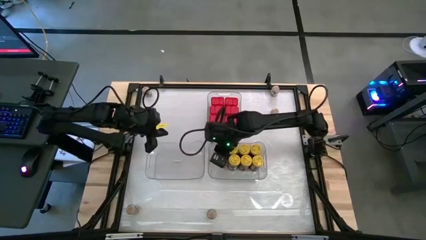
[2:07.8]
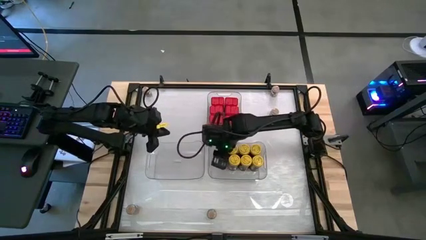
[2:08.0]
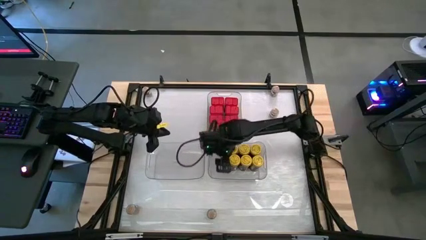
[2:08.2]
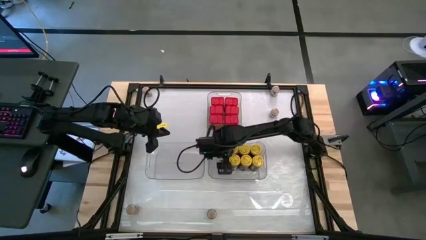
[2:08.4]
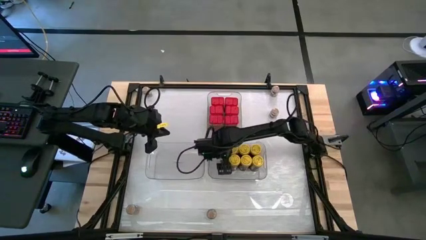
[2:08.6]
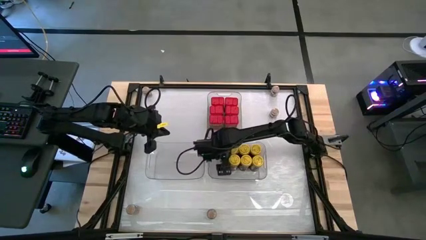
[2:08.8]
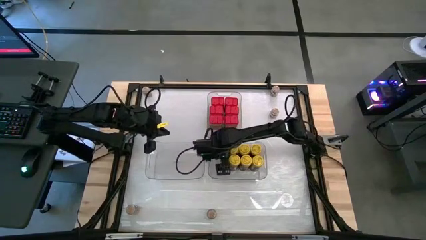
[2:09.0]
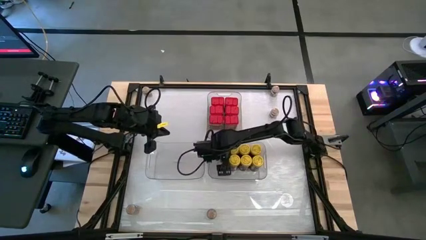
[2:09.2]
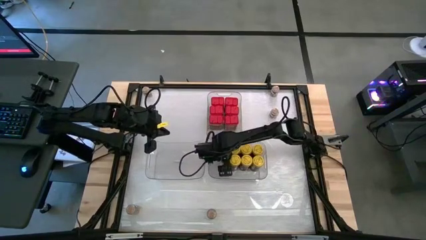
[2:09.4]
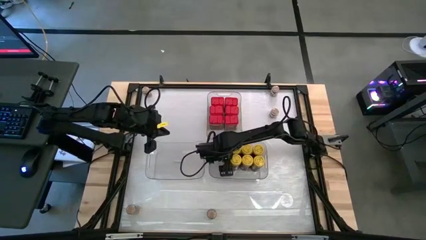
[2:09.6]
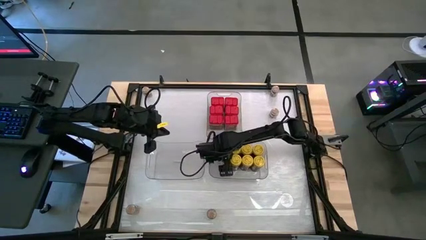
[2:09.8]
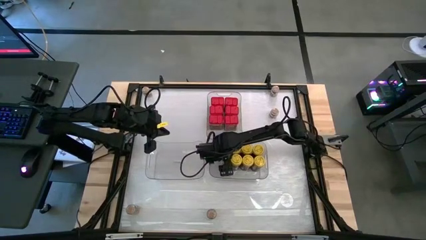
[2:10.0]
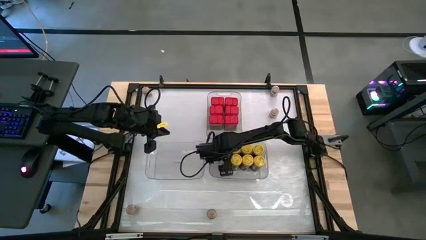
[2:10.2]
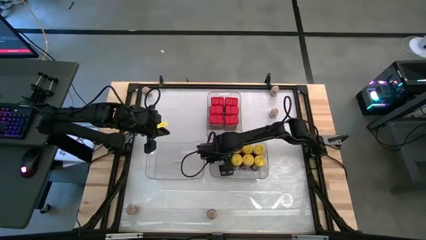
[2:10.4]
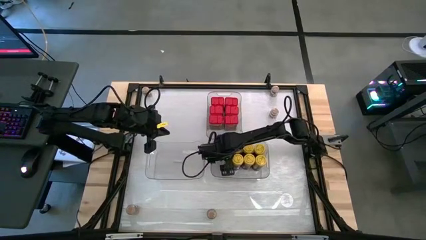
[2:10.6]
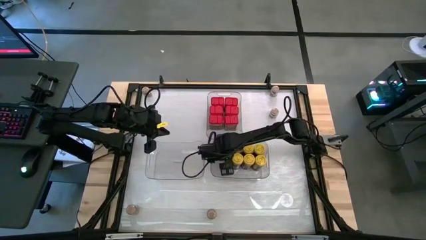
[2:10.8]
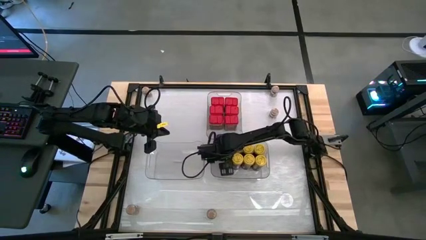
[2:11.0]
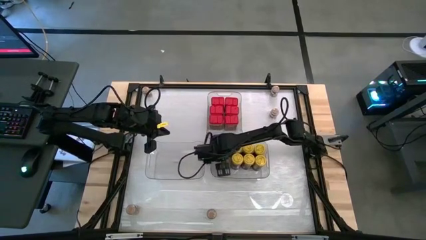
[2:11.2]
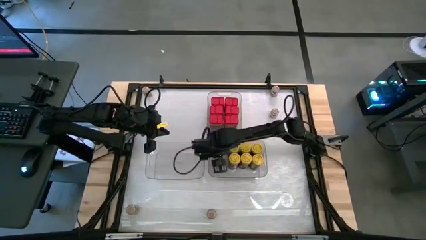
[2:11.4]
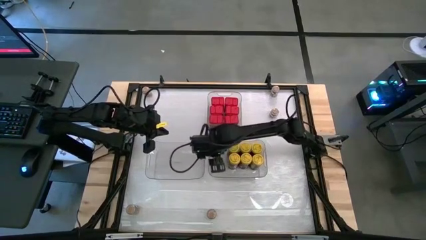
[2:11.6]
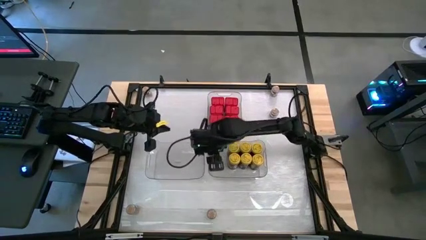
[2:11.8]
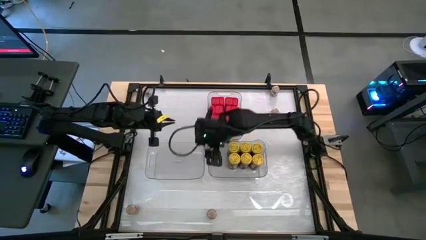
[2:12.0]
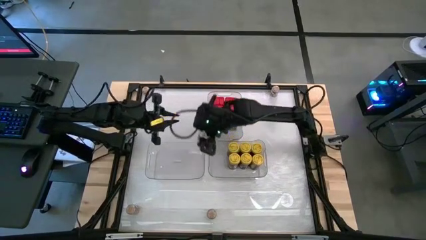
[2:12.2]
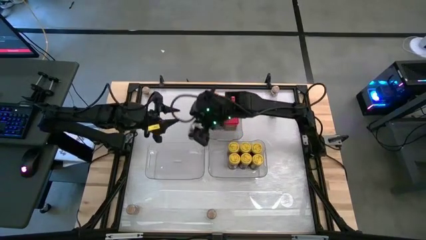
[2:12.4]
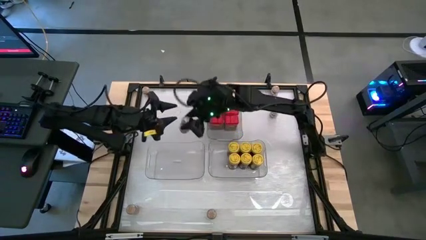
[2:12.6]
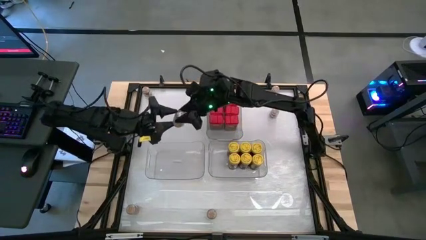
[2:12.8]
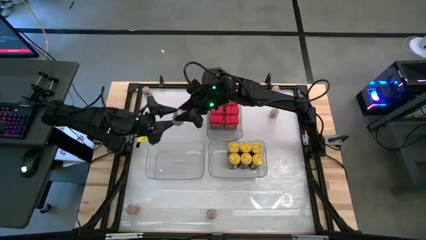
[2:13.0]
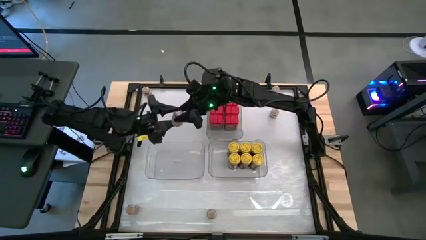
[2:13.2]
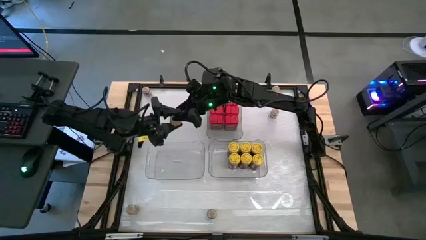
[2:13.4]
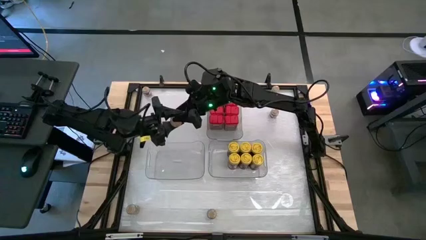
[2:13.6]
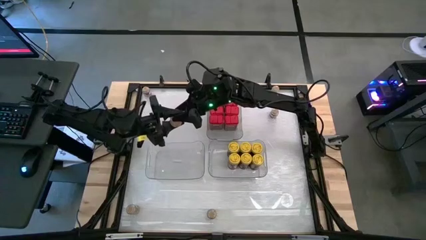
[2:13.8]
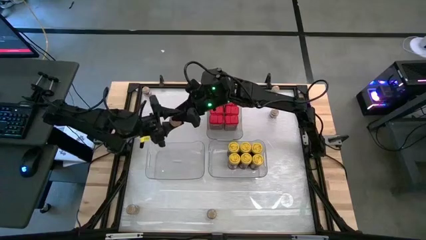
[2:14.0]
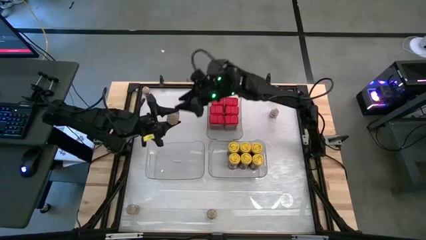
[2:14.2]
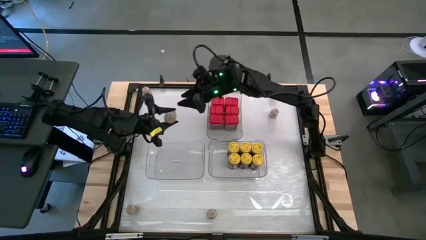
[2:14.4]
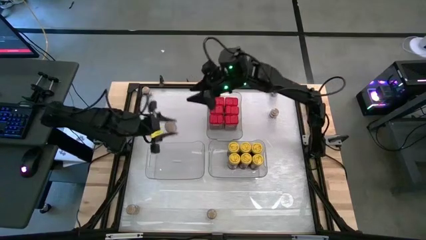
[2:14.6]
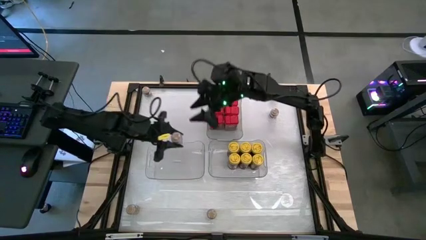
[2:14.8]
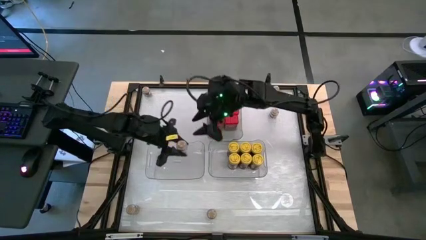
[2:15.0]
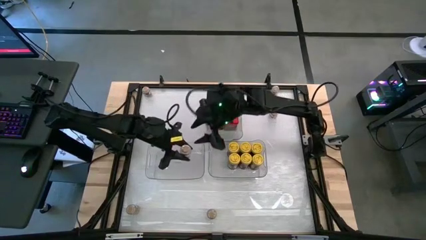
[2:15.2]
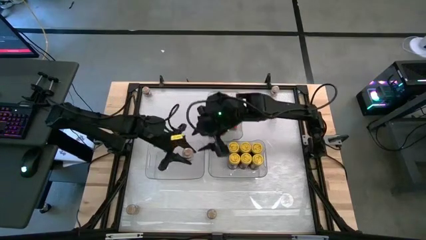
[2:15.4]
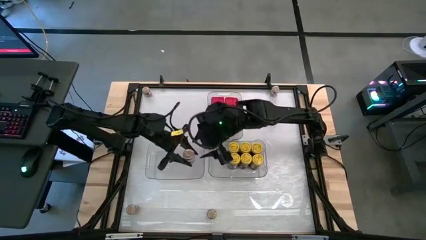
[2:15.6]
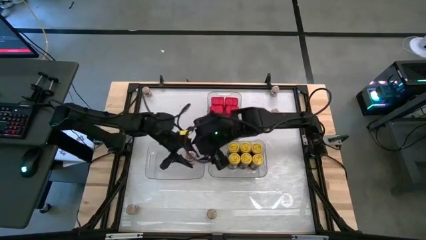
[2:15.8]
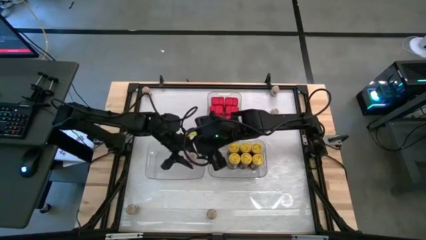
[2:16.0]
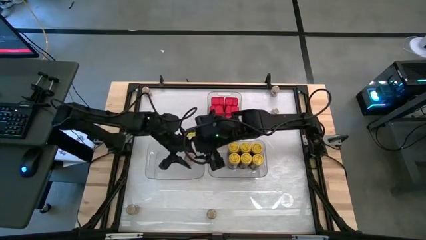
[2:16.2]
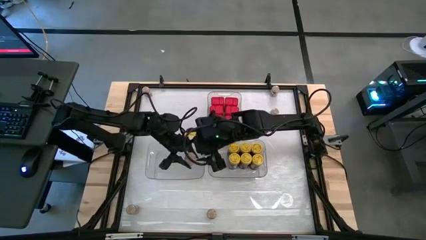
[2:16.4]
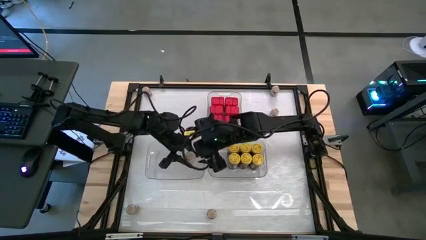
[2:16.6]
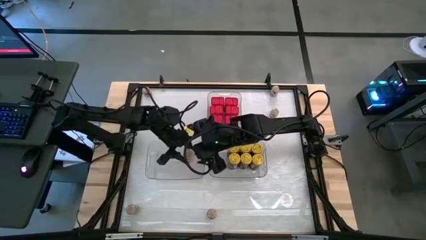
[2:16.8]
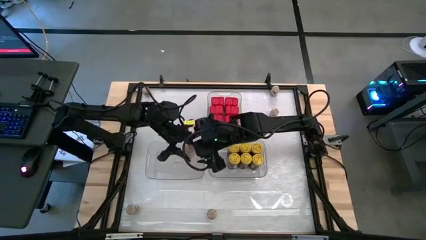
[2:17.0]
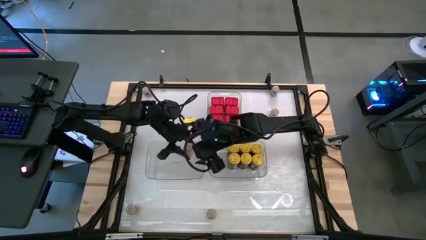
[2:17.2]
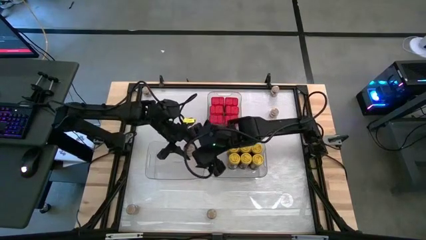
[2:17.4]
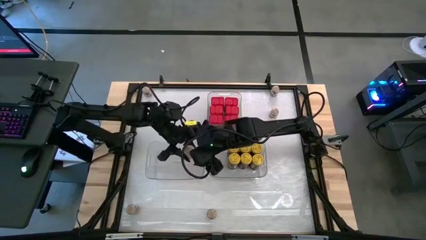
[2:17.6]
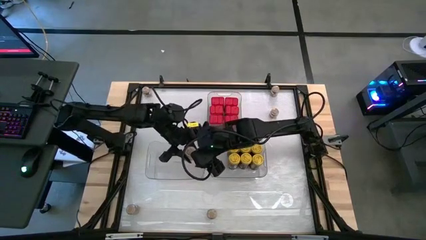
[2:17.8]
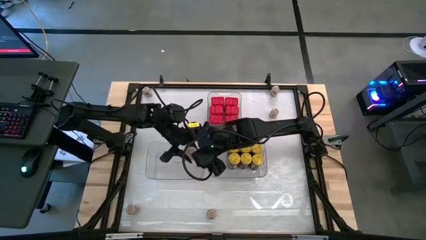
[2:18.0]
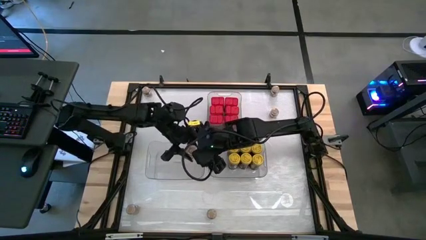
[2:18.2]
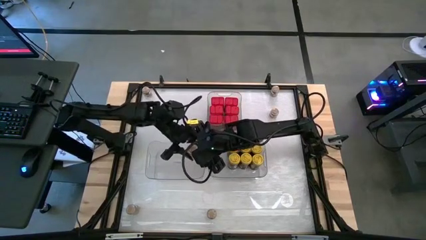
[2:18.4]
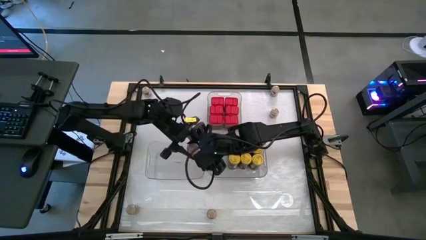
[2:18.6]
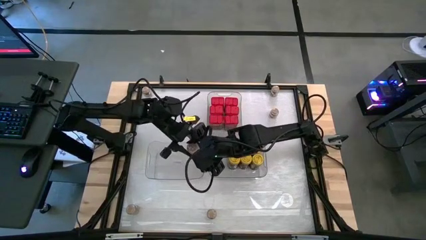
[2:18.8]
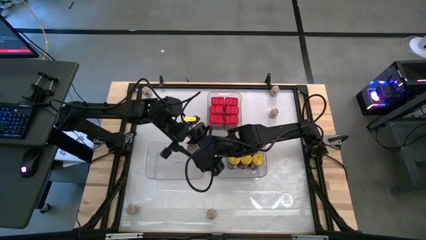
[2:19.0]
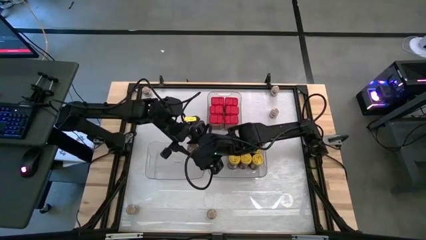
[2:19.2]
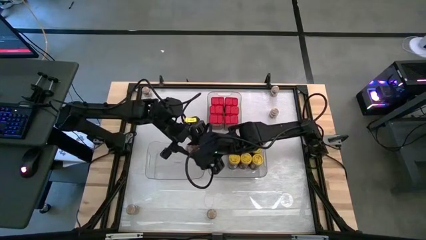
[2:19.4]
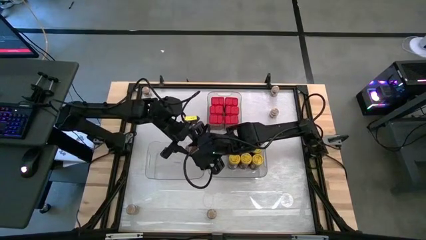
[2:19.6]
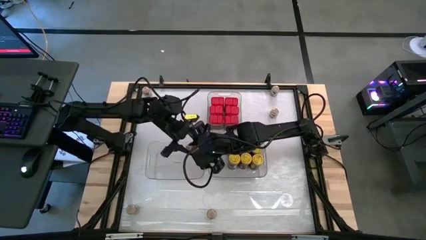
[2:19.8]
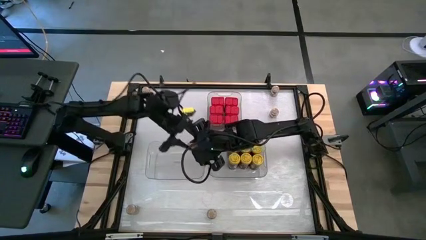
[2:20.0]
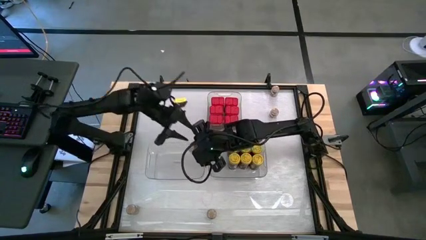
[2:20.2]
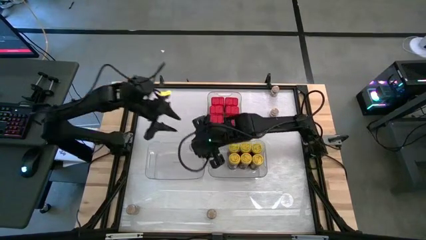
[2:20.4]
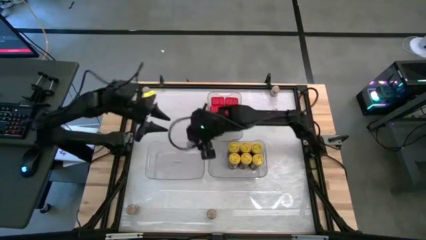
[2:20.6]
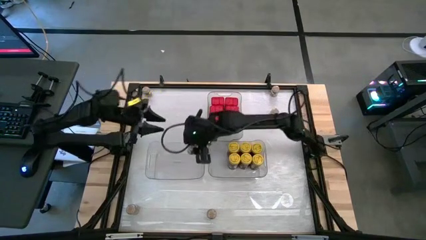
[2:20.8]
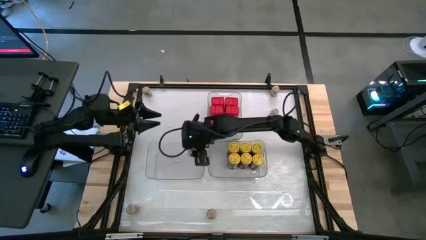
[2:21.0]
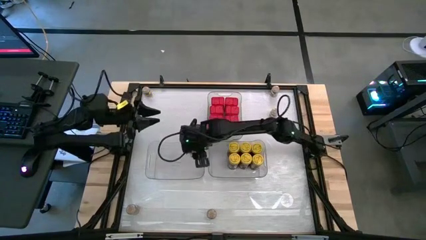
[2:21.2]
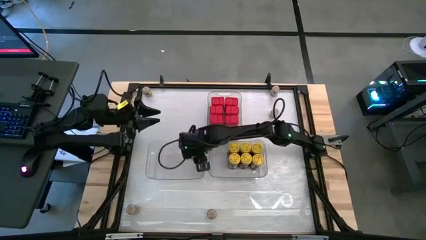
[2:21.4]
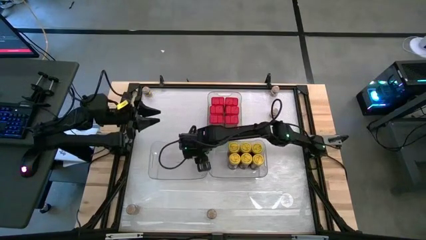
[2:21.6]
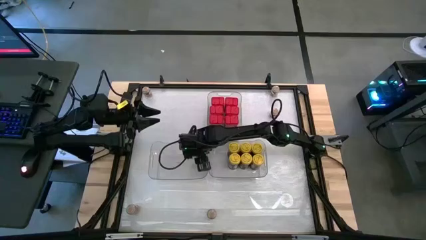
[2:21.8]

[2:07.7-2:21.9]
Task: Sort spices by type
Put the brown seasoning bottle into the bottom left transparent bin
